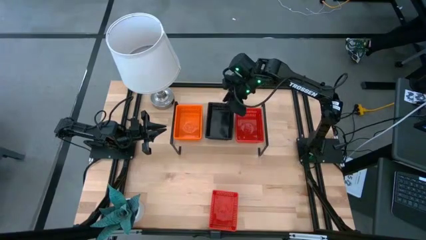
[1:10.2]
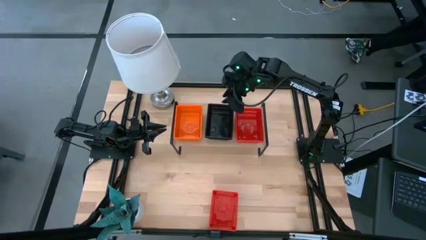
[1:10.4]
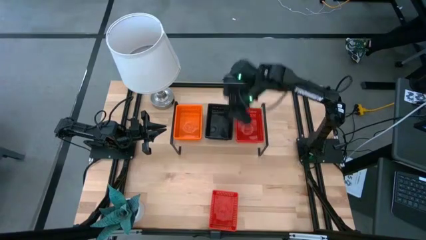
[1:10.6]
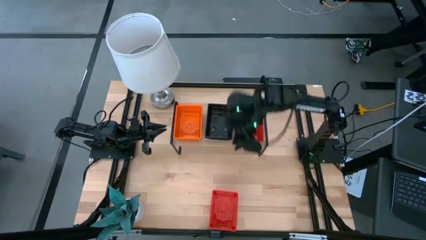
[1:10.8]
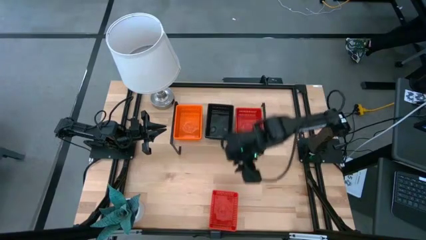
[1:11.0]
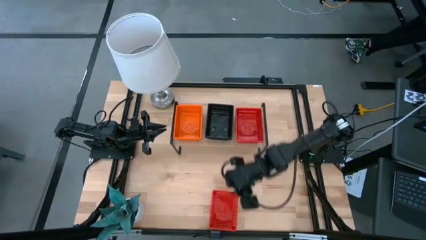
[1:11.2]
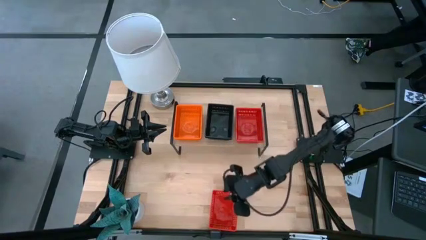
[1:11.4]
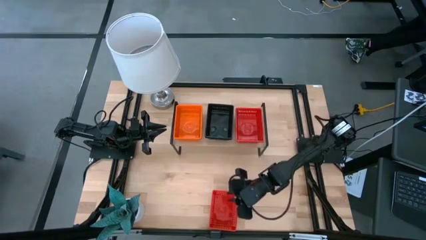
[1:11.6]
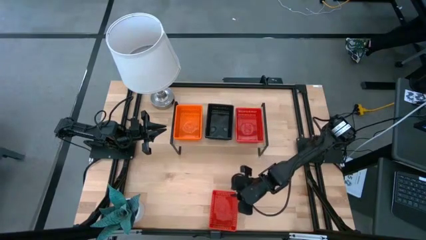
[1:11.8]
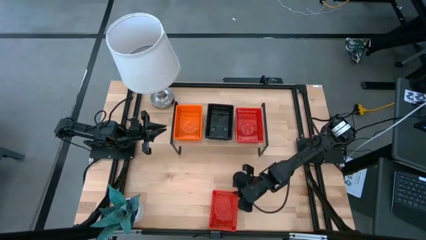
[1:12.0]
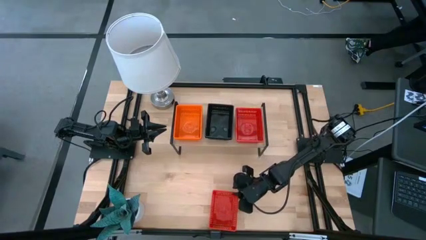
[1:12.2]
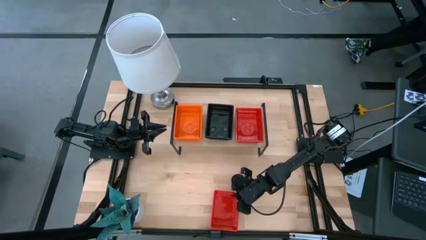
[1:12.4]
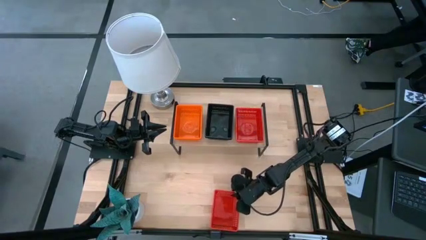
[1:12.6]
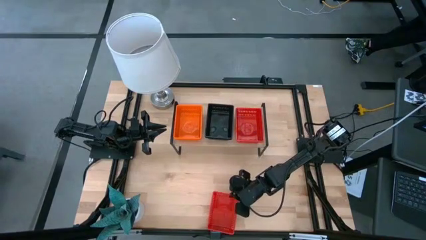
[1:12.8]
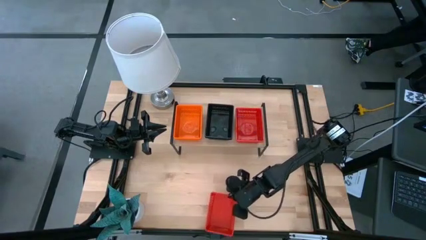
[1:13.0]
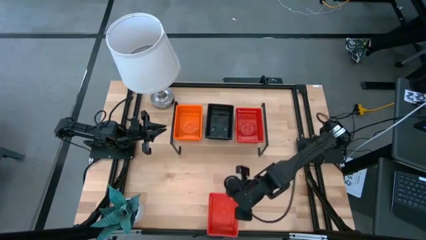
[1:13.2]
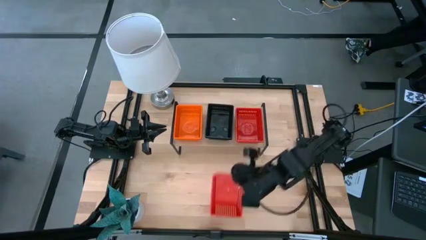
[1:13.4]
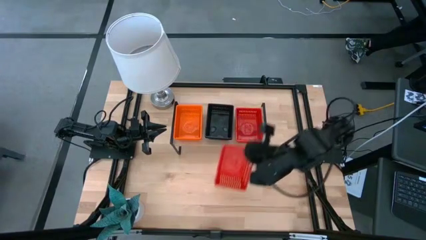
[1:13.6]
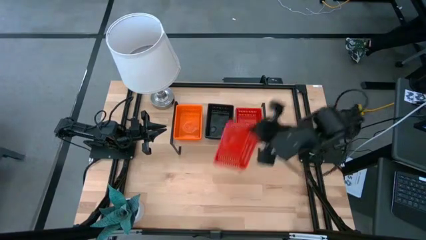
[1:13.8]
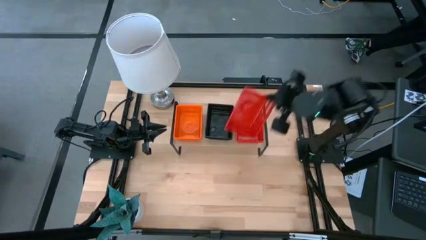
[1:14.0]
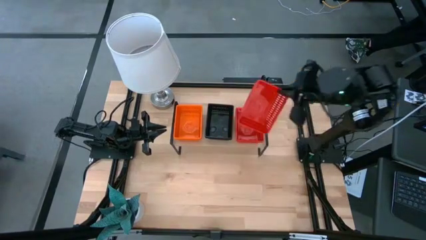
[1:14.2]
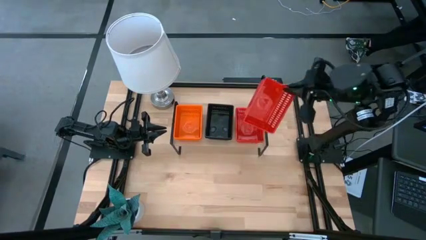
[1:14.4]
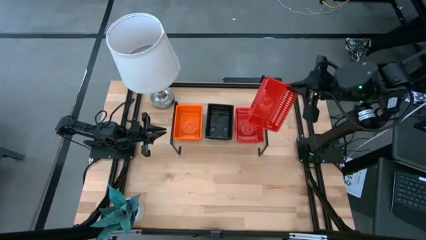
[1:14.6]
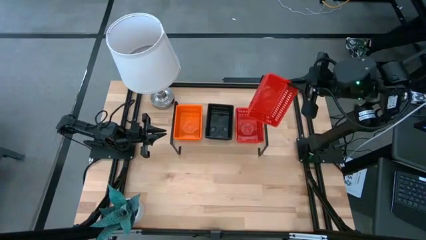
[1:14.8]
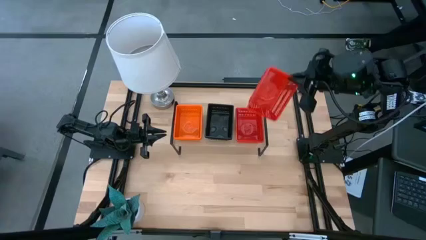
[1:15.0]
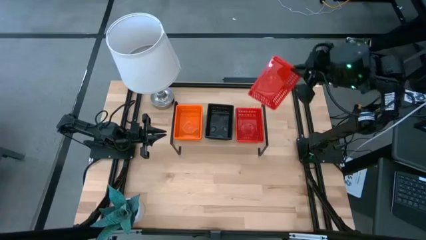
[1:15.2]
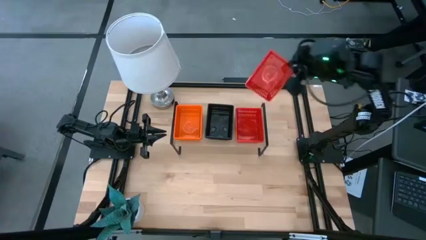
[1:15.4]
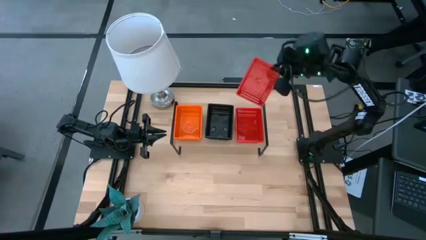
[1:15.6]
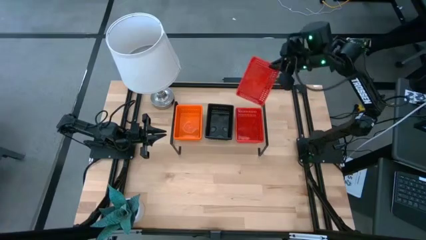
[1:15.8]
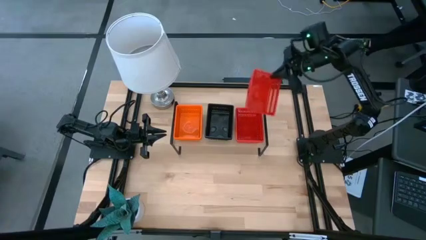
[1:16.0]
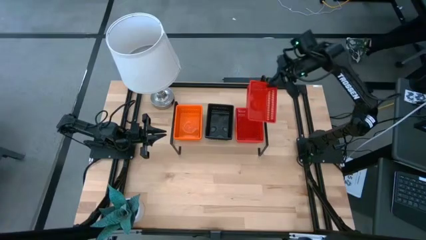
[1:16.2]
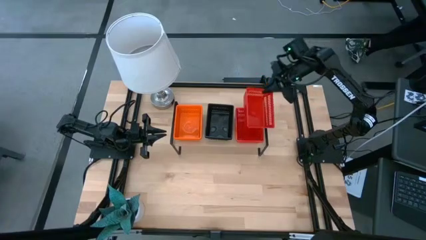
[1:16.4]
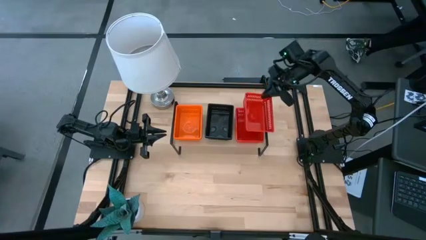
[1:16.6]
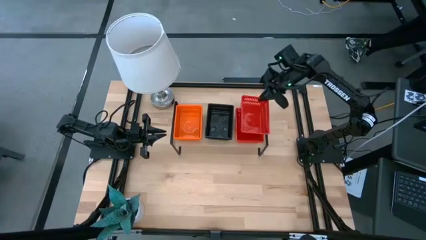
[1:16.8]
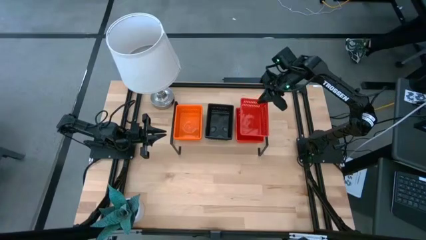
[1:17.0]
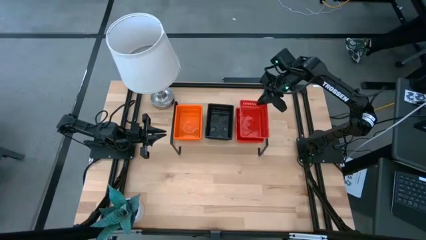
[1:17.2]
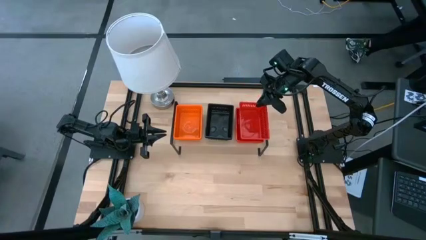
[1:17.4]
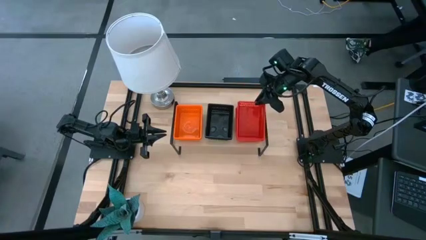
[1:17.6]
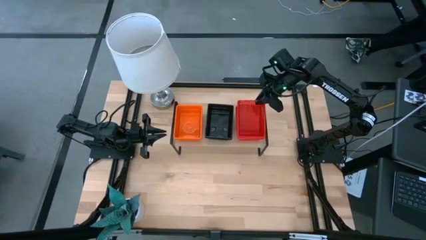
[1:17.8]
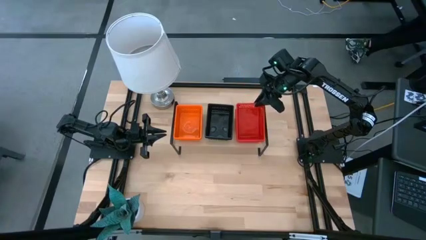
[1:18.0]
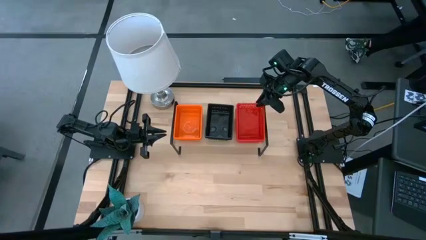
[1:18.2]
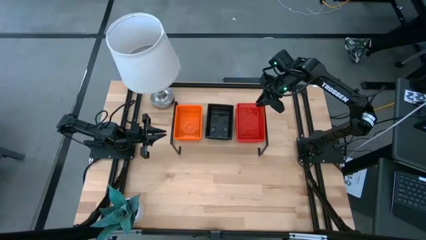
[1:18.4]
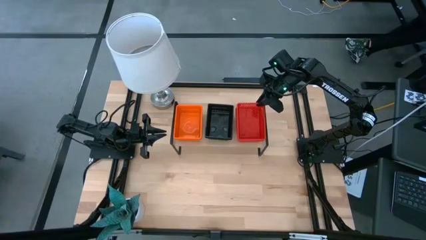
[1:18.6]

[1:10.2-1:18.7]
Task: Stack baskets on shelf by color
Stack the red bin on top of the red bin on the shelf

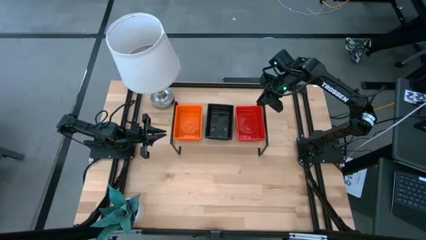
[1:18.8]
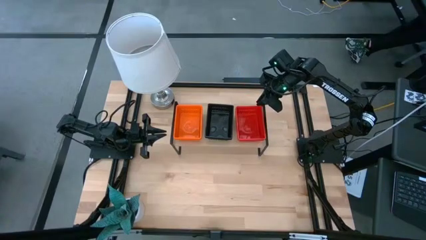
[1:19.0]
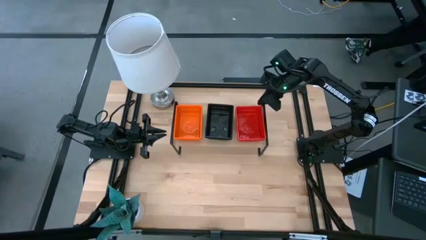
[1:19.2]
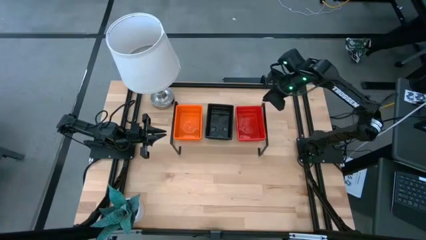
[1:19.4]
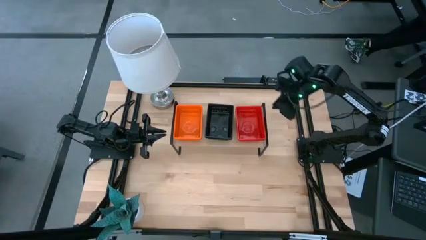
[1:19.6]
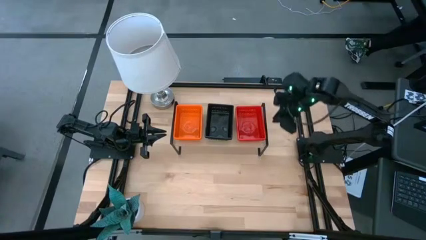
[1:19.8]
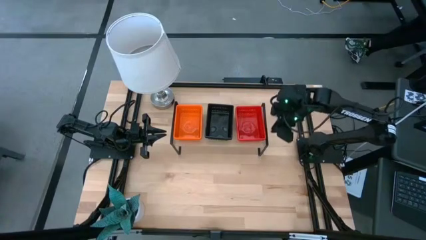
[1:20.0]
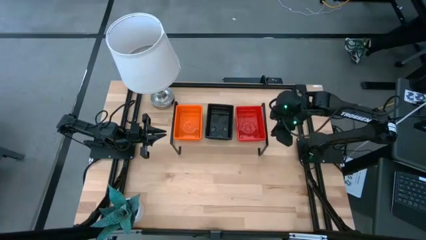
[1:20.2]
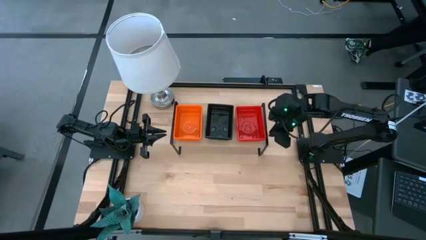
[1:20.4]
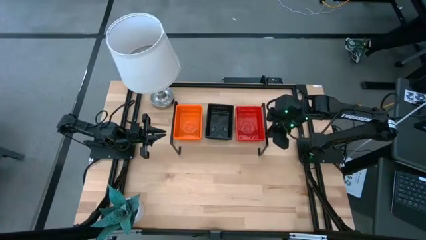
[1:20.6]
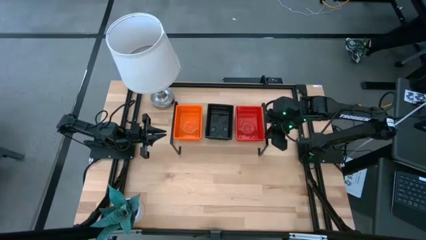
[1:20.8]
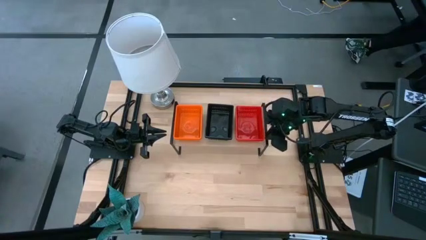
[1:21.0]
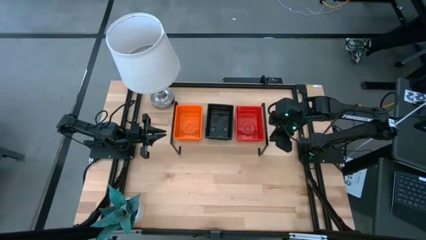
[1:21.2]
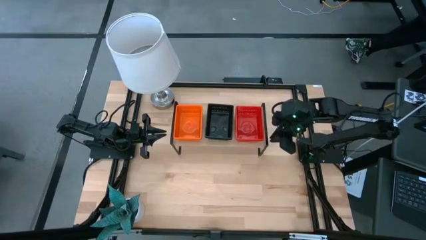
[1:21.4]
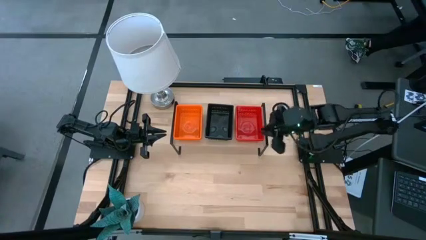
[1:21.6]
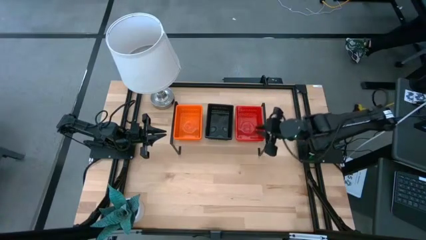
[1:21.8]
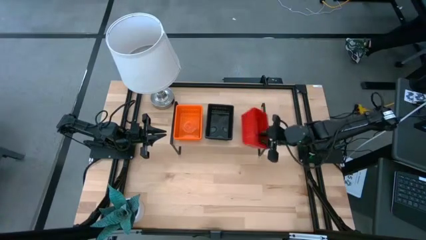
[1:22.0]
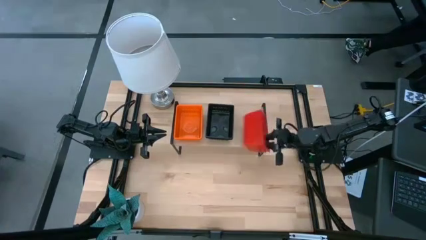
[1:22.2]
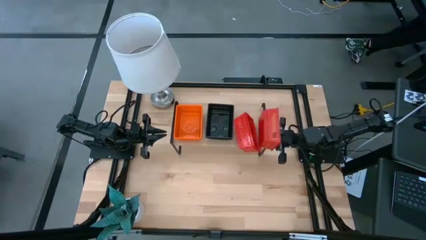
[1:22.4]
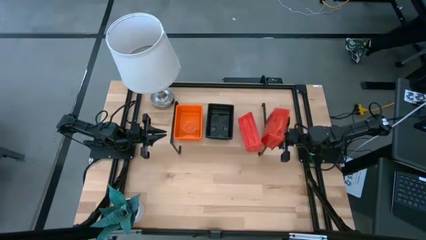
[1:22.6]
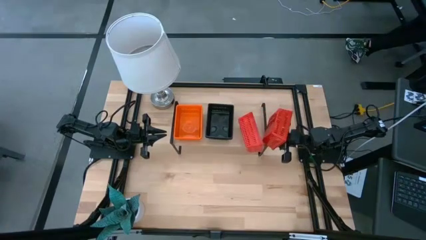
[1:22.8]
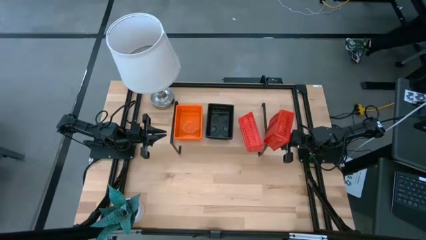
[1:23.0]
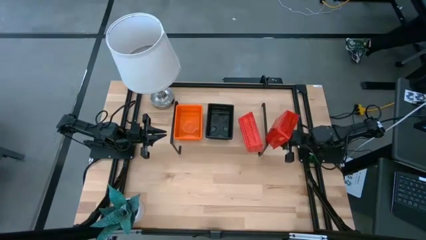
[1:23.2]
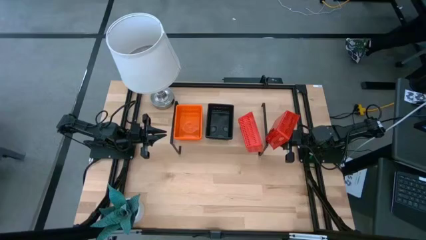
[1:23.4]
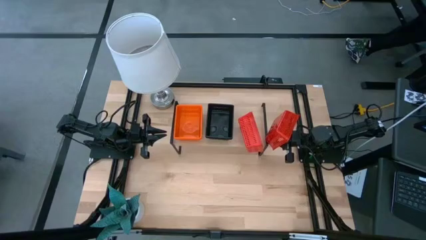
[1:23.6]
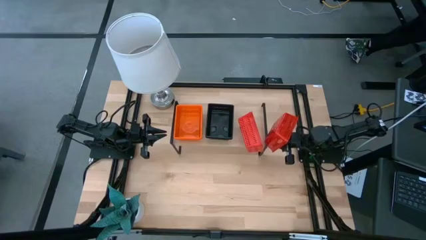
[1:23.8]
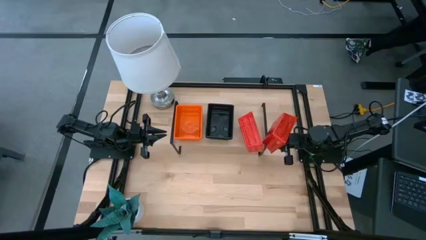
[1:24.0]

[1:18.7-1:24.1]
Adjust the red bin on the shelf

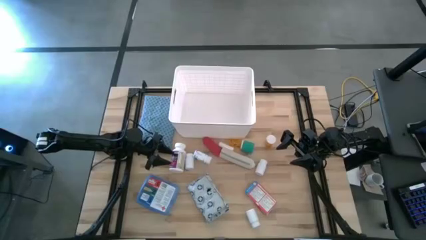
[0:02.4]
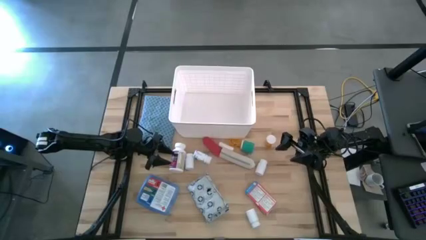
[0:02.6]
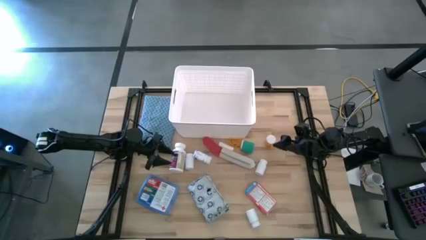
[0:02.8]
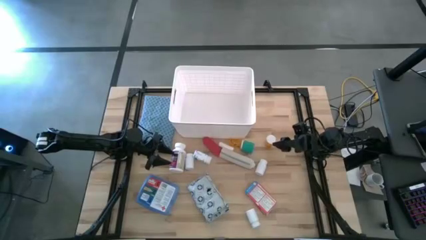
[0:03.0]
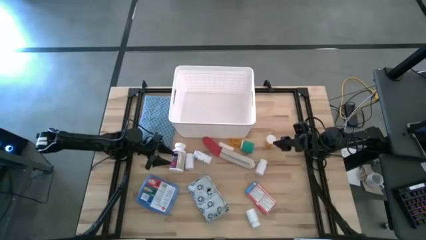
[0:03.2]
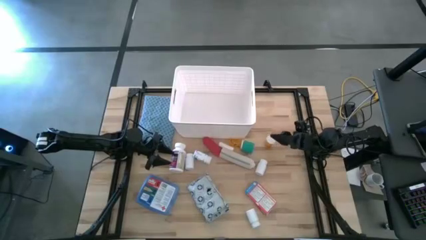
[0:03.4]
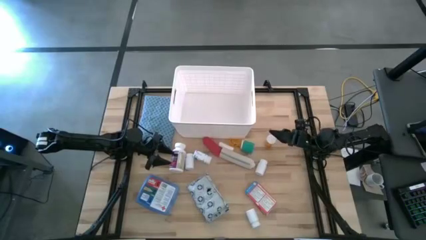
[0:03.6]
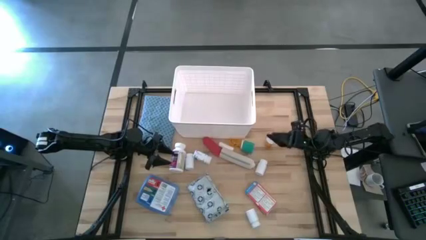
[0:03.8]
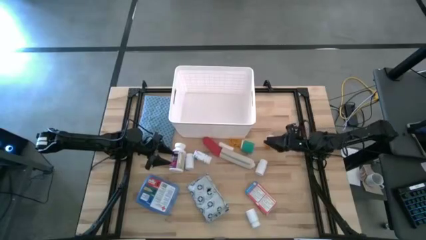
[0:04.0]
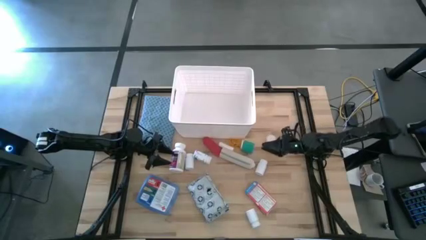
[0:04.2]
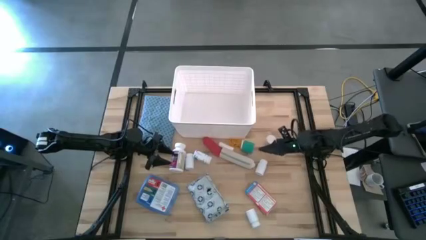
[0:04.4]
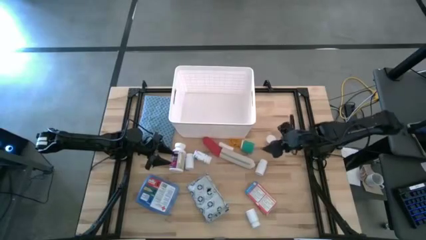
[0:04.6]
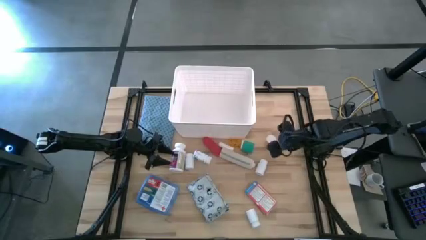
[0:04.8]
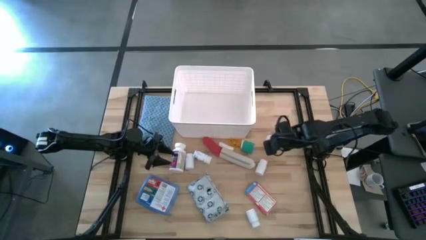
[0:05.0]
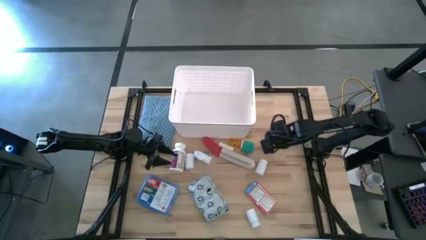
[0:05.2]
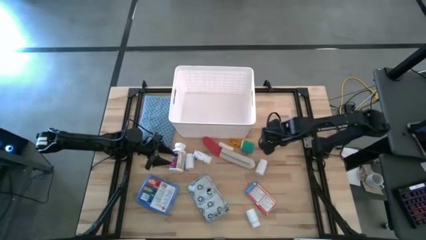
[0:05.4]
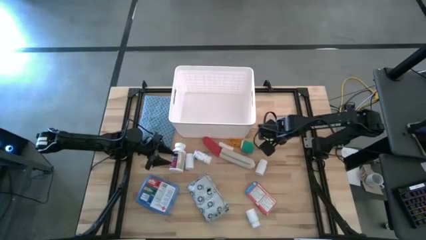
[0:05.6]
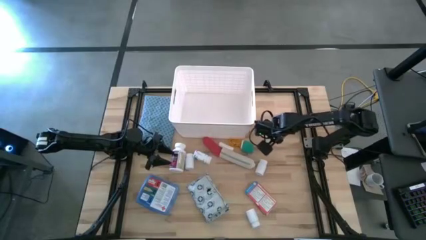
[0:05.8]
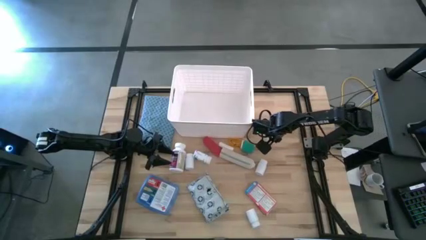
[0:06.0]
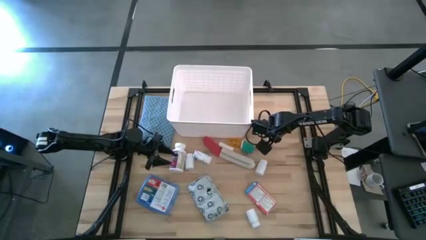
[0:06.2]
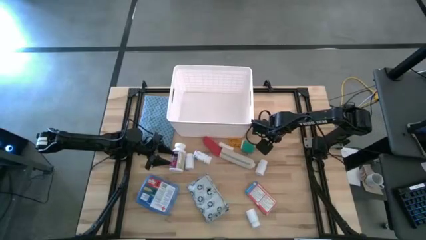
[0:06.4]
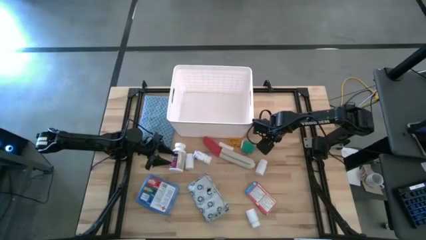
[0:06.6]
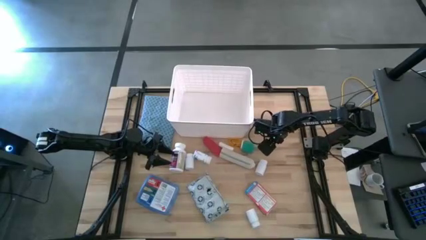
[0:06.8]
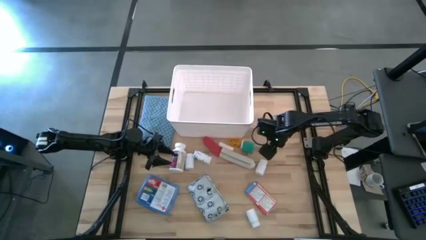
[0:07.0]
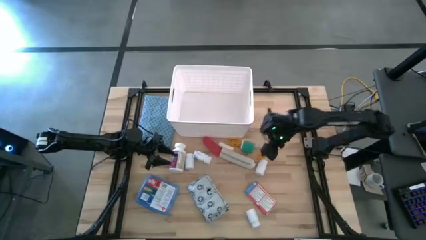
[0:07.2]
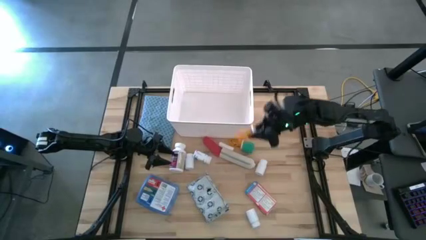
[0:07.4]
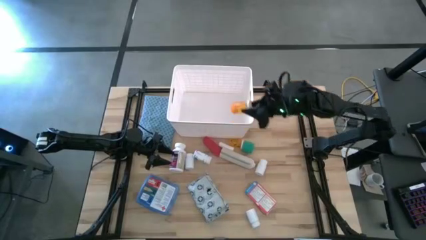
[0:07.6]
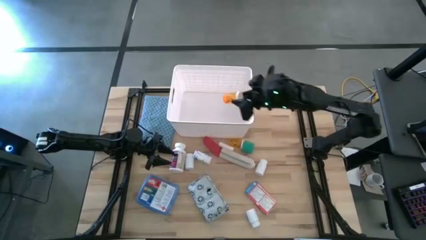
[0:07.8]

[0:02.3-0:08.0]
Task: Pick & place medical supplies in basket/bin
Put the right orange pill bottle in the white bin
